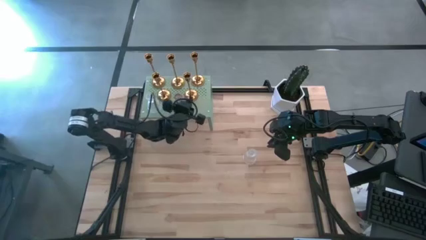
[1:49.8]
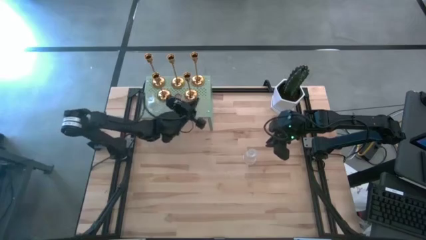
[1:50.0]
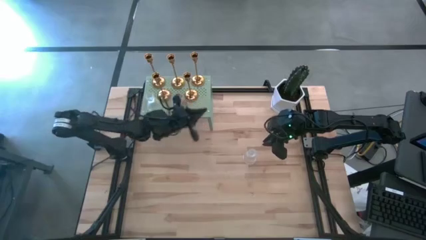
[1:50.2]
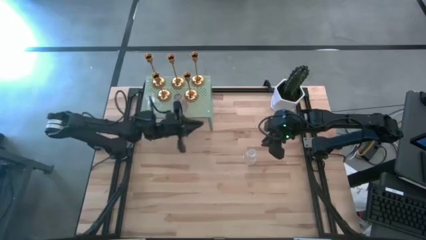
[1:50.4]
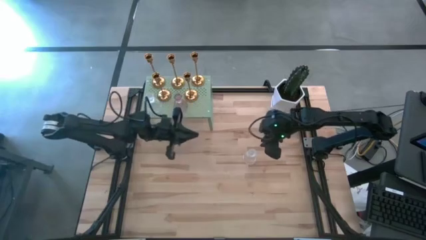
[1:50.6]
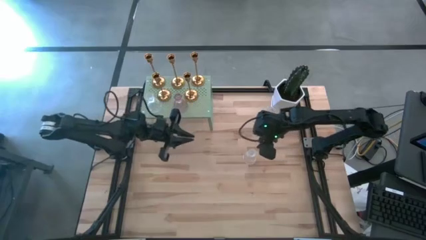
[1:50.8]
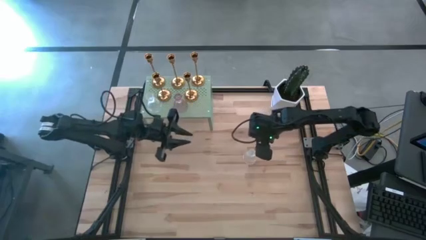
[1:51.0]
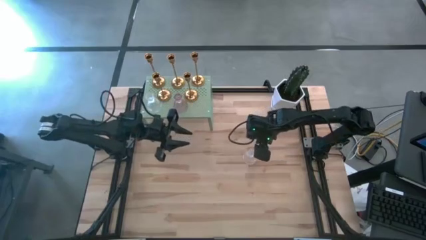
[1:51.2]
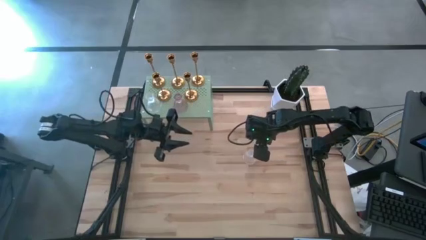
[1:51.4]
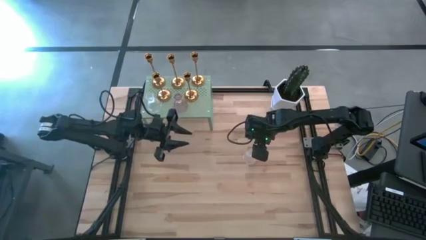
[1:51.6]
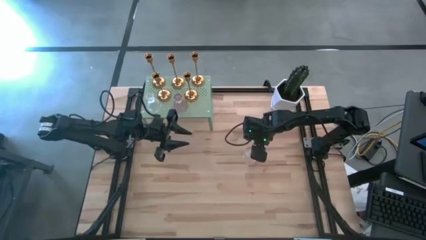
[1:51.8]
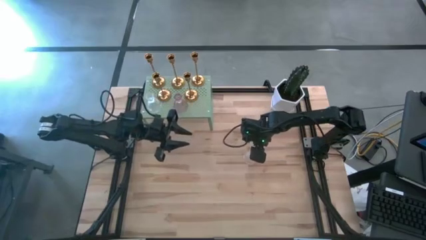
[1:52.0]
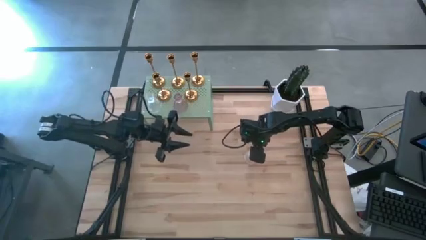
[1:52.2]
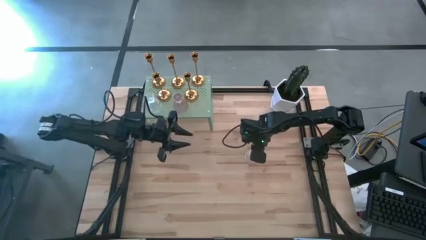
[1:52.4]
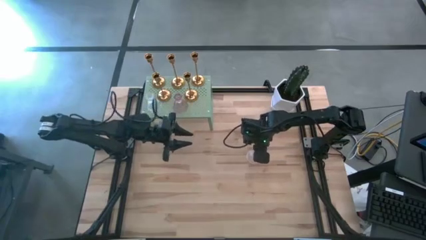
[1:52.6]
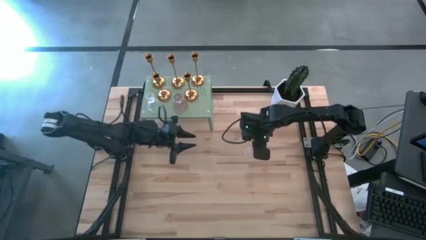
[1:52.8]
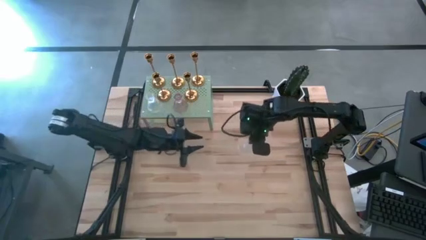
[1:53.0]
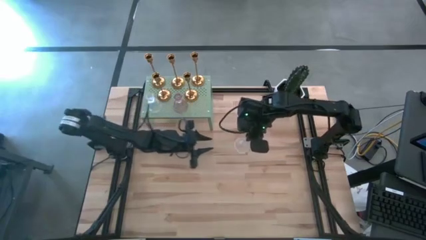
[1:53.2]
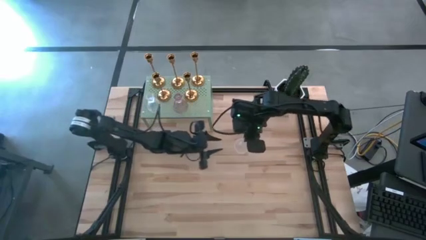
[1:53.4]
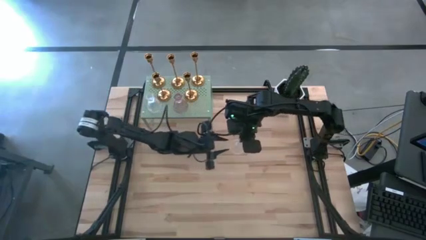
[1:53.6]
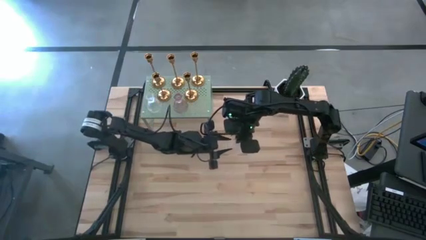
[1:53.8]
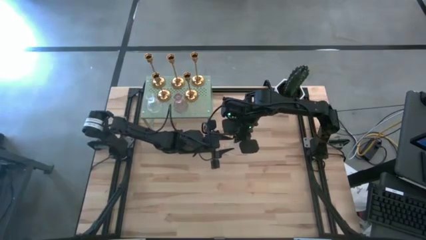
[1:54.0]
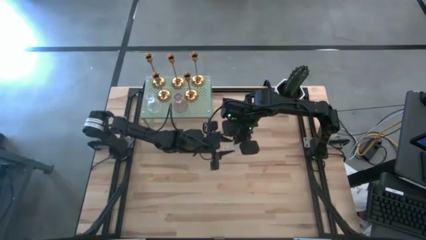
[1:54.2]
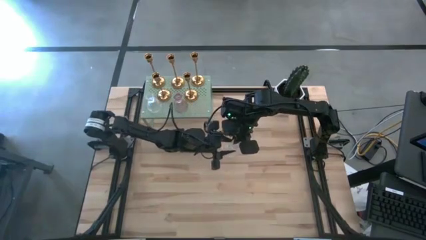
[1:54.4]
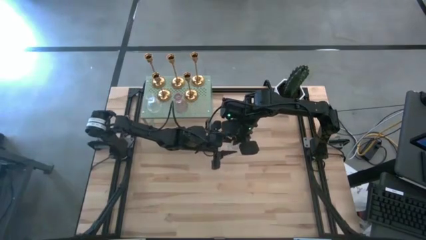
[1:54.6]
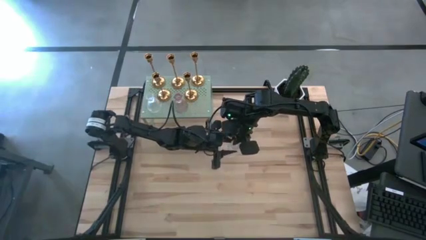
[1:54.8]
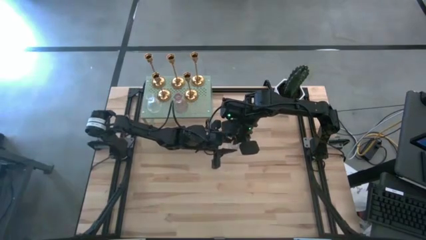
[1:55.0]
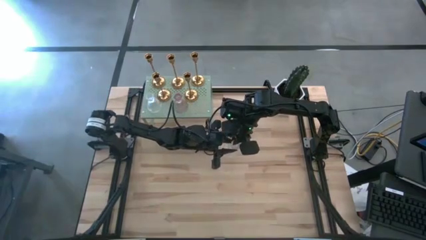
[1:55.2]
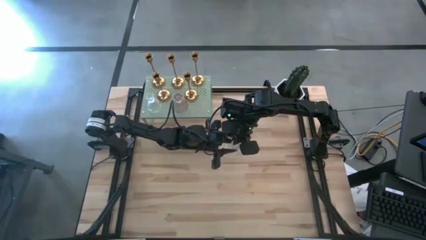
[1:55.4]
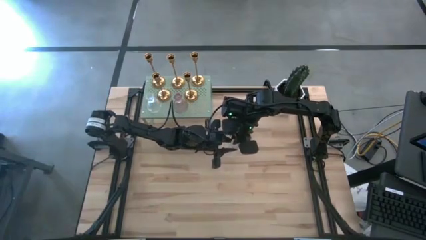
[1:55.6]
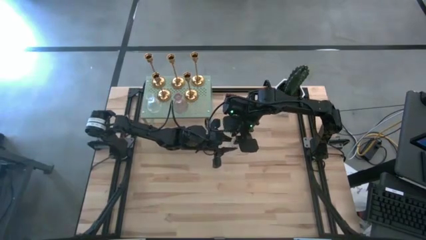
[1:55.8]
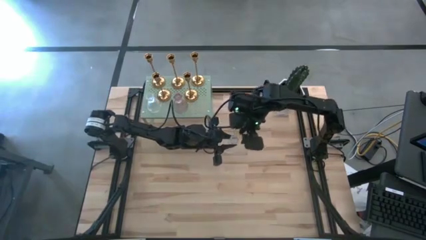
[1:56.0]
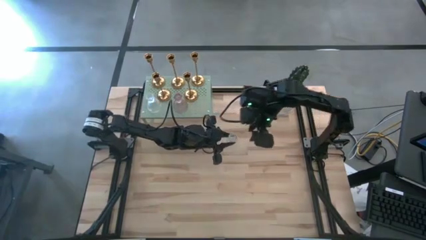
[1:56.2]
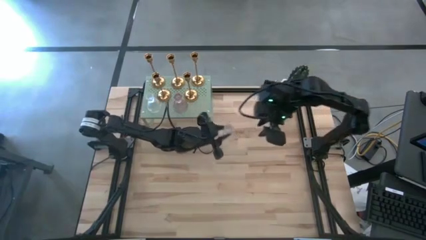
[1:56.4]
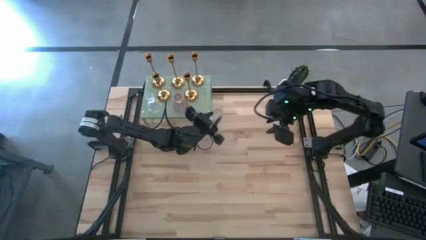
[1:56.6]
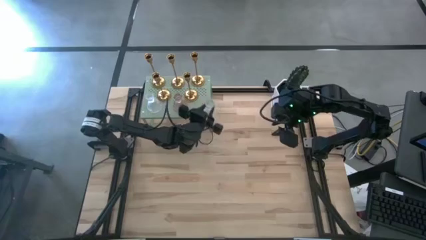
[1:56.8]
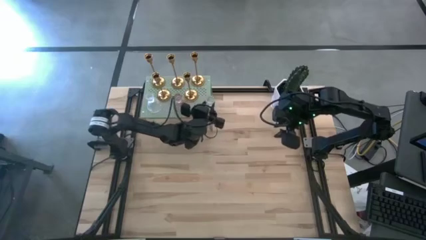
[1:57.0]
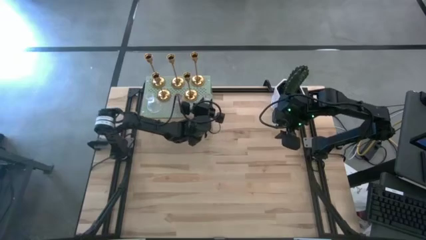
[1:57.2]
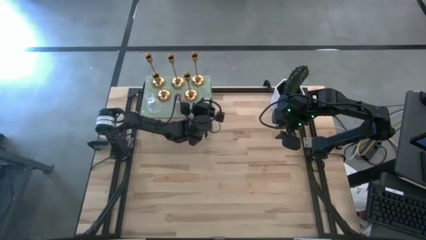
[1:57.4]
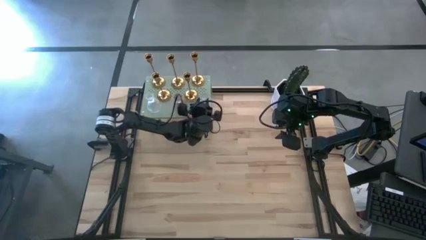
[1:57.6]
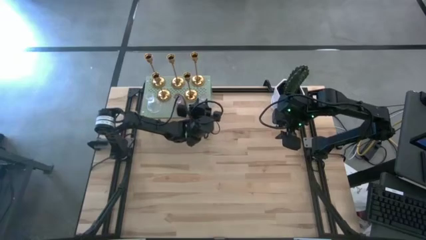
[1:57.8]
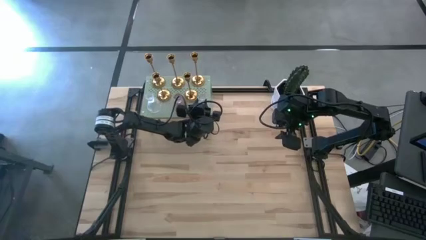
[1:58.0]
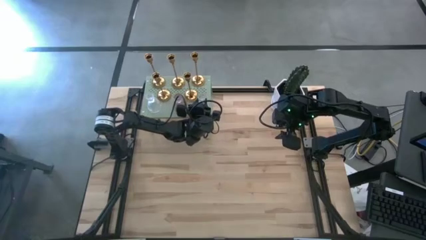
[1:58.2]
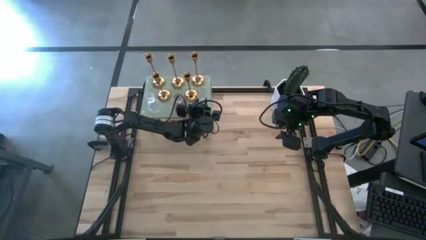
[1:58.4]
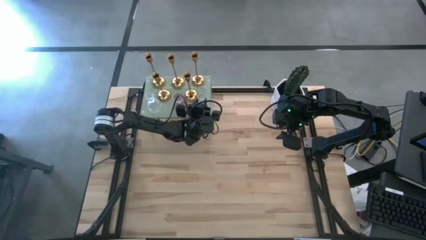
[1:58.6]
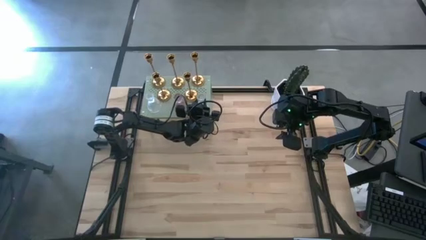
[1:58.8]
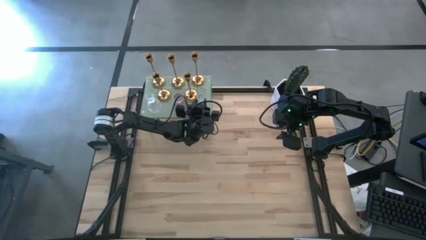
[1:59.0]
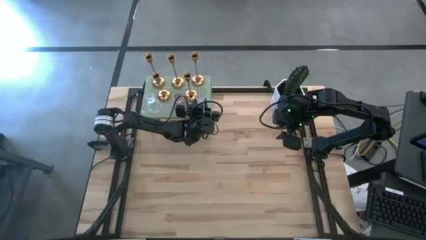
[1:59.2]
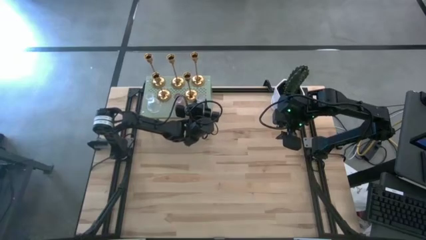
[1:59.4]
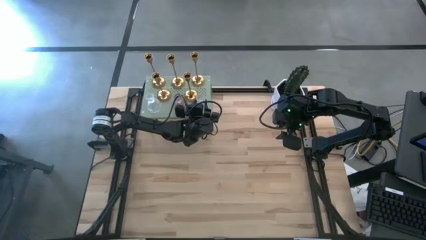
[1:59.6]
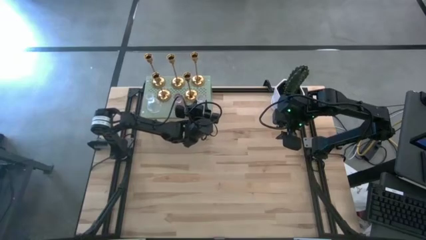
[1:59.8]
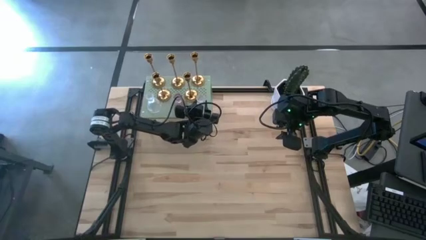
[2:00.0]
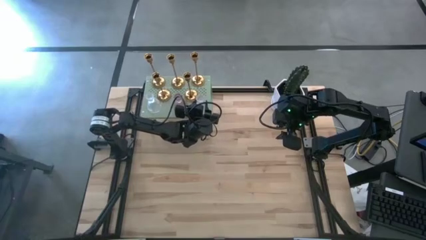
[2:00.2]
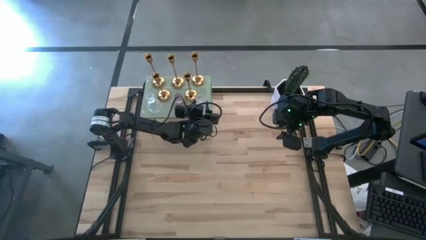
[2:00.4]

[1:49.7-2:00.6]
Task: Pick & Place candle stick holders
Put the transparent glass candle holder on the shelf
